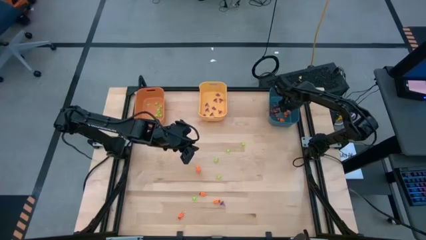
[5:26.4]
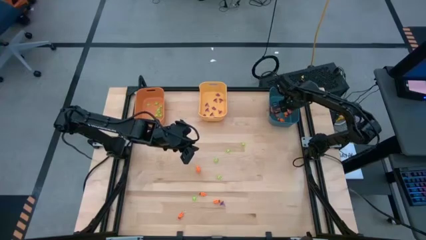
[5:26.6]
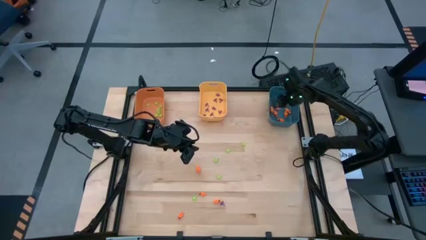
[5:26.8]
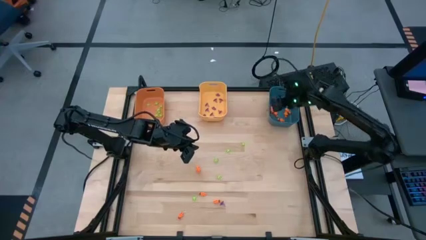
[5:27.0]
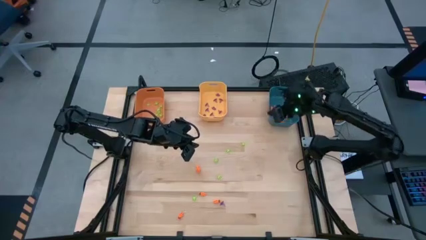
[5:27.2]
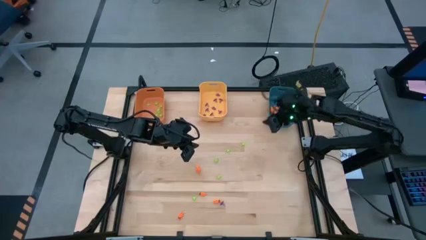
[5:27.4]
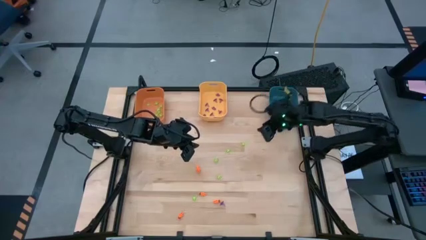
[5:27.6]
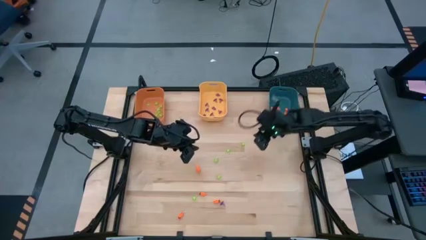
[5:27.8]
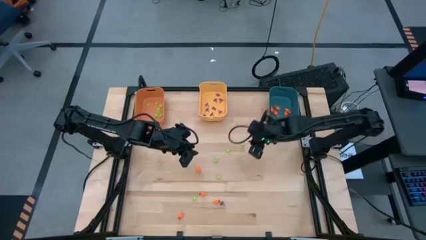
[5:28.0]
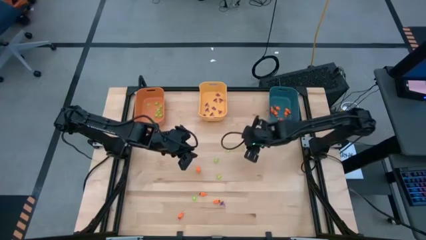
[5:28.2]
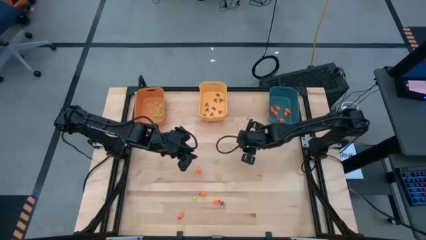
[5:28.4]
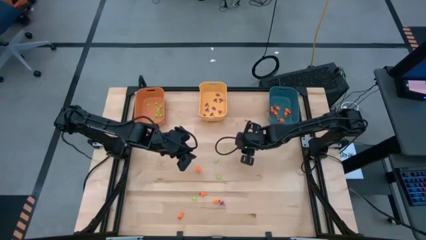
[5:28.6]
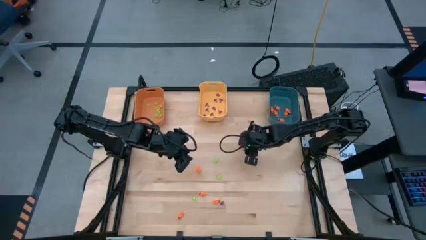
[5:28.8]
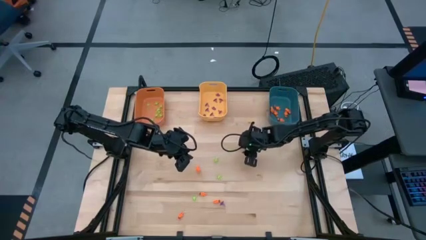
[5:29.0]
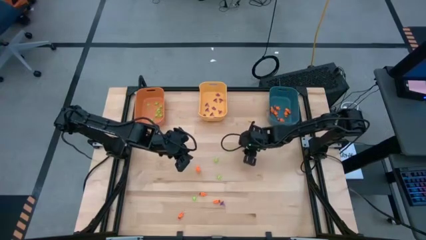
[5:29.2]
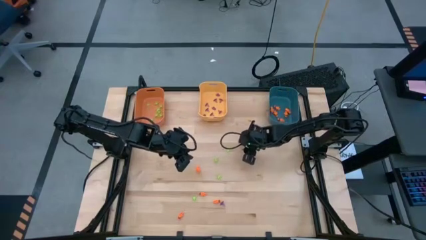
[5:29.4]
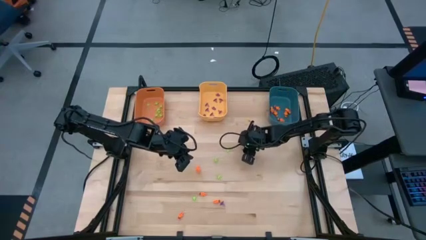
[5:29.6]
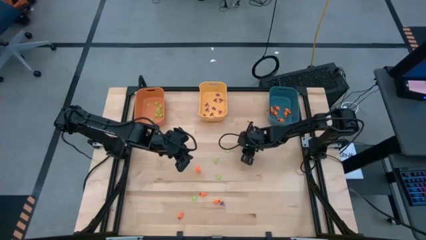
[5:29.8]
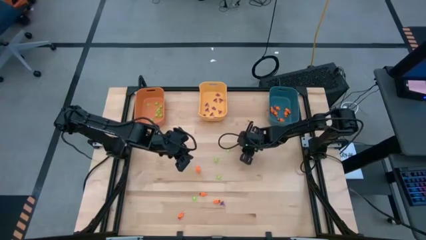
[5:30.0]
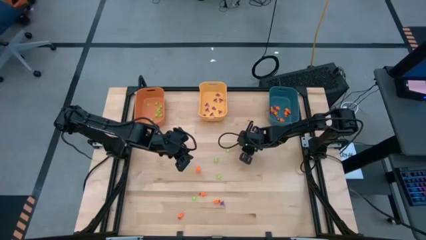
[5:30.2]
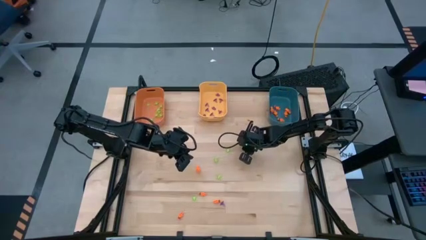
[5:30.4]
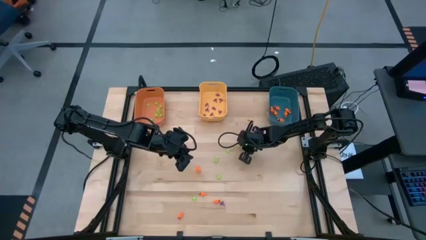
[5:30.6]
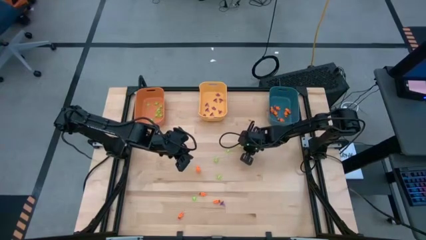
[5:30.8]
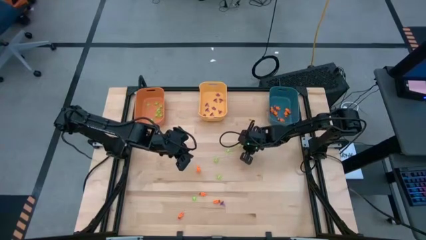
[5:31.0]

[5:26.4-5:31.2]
Task: Sort Halloween decoration
Put the green spider toy into the orange bin

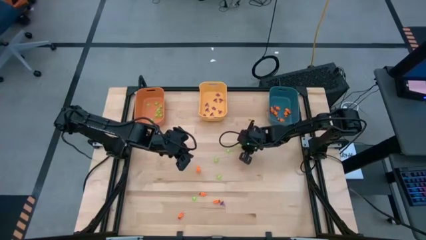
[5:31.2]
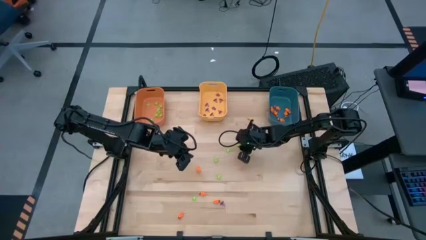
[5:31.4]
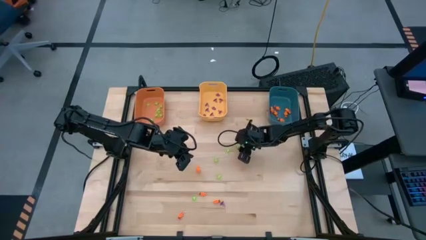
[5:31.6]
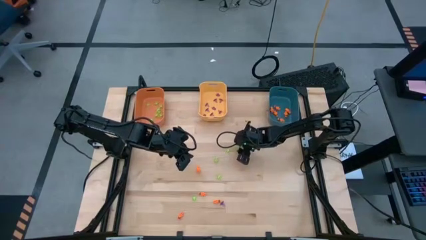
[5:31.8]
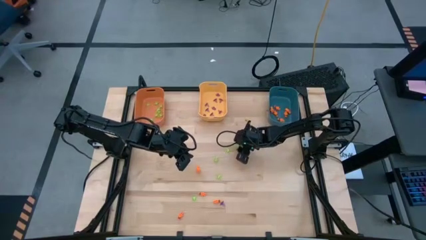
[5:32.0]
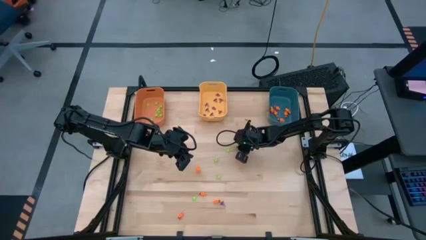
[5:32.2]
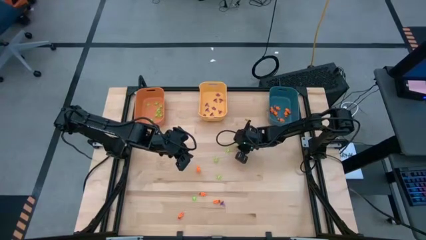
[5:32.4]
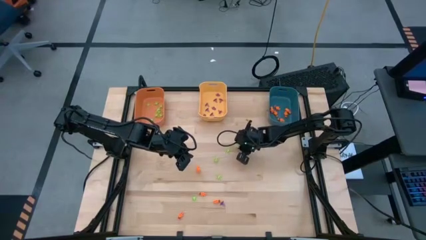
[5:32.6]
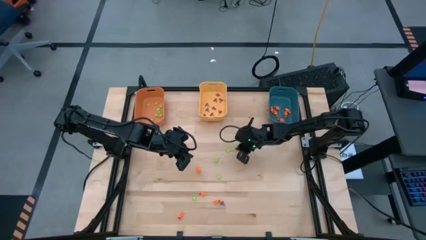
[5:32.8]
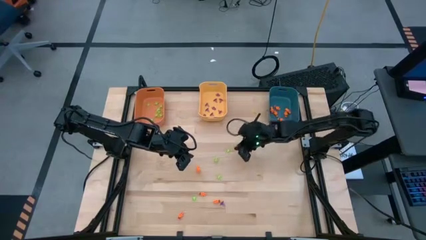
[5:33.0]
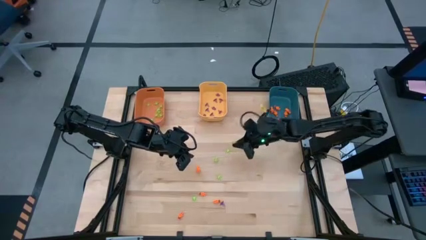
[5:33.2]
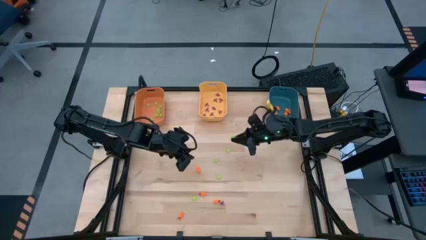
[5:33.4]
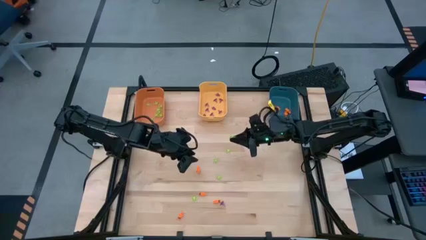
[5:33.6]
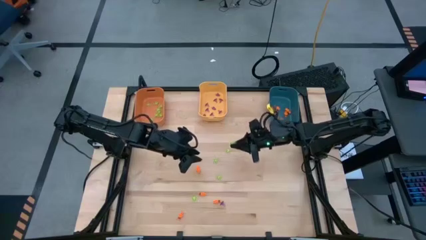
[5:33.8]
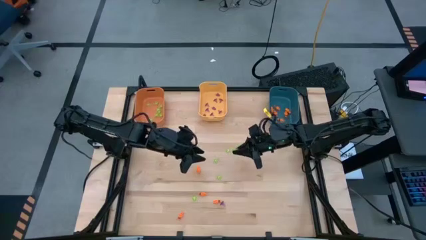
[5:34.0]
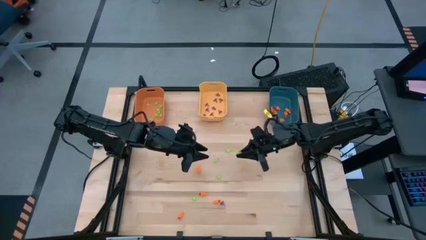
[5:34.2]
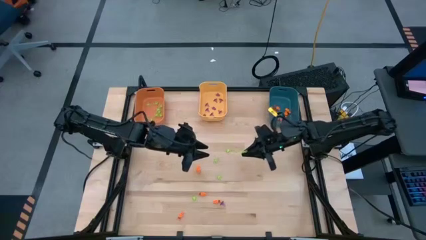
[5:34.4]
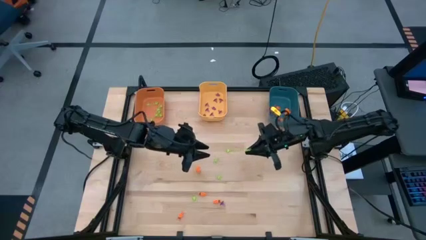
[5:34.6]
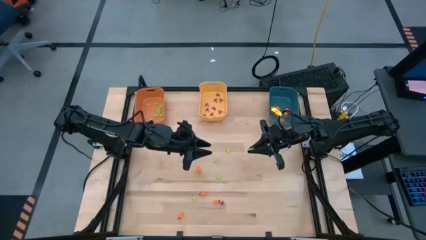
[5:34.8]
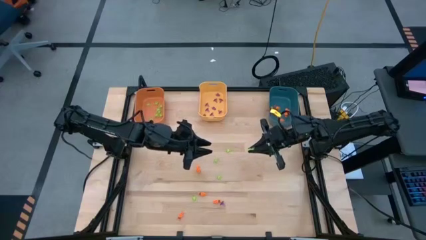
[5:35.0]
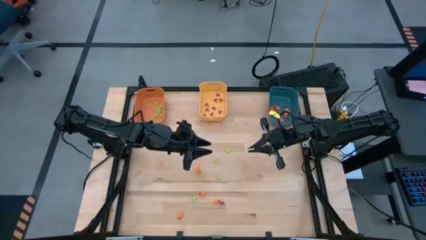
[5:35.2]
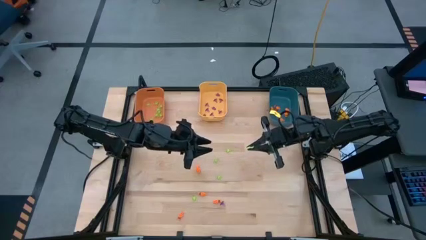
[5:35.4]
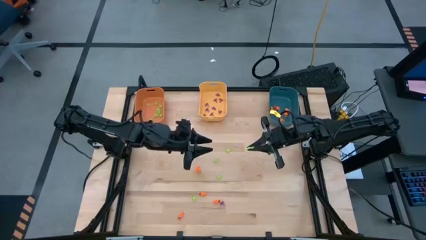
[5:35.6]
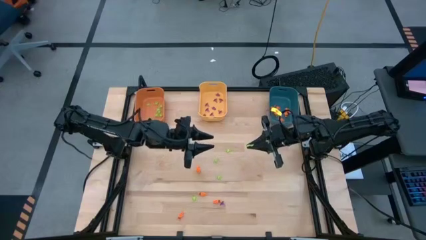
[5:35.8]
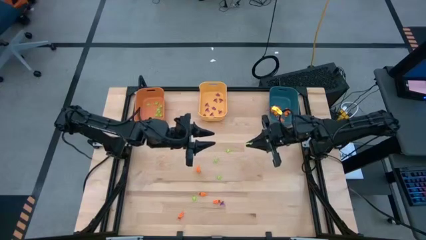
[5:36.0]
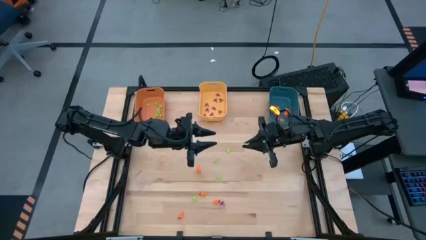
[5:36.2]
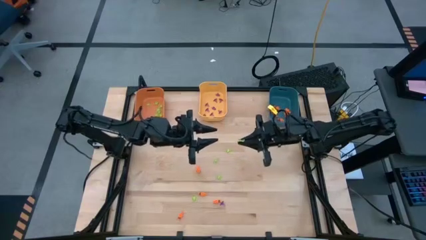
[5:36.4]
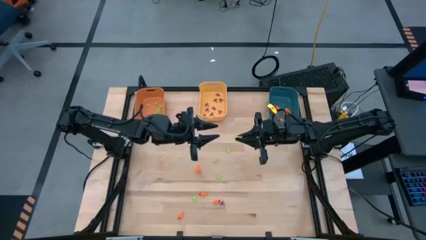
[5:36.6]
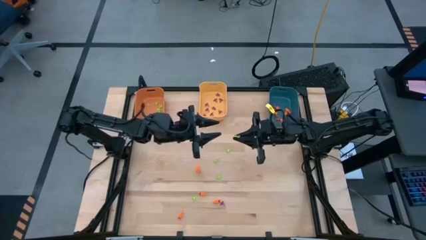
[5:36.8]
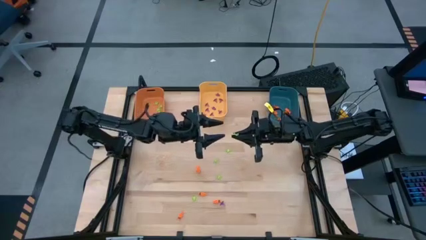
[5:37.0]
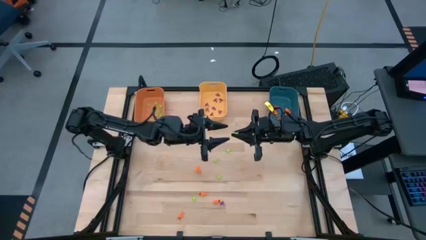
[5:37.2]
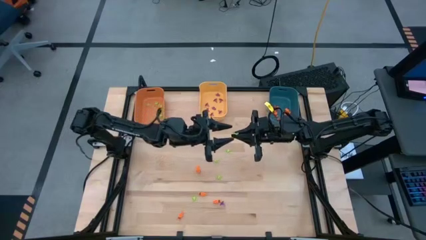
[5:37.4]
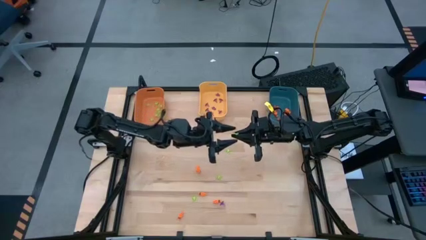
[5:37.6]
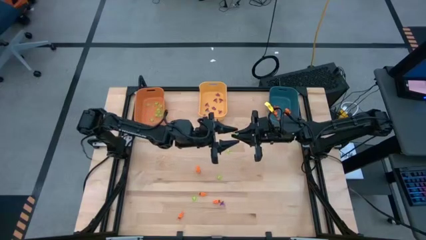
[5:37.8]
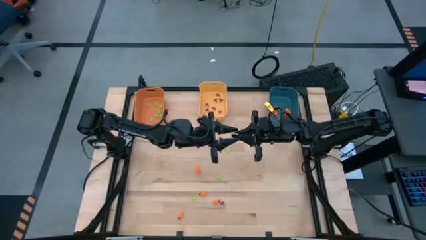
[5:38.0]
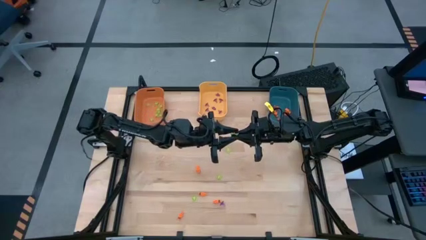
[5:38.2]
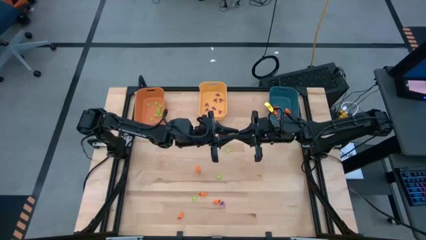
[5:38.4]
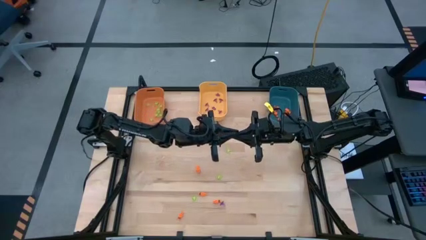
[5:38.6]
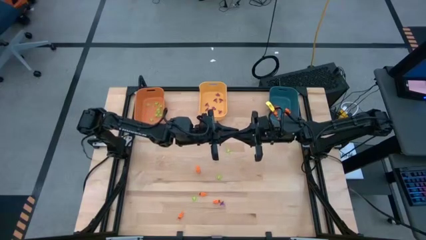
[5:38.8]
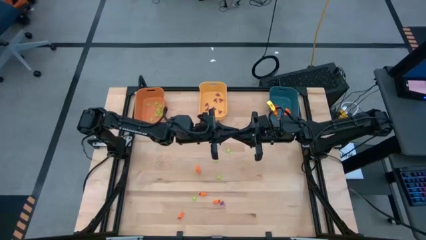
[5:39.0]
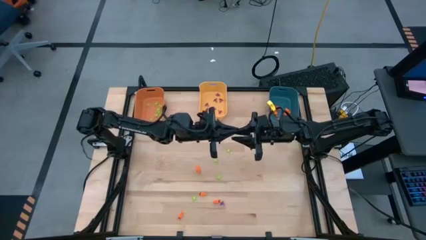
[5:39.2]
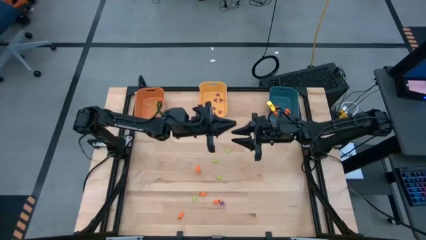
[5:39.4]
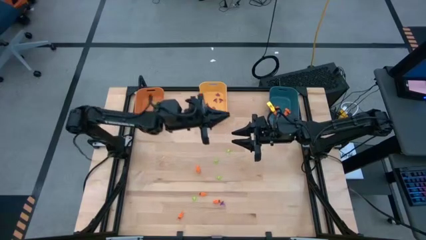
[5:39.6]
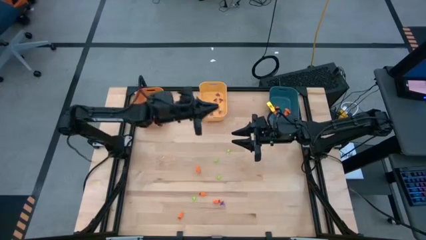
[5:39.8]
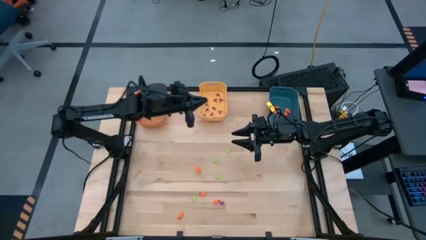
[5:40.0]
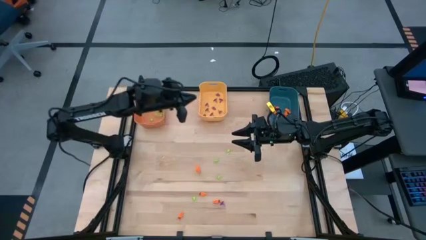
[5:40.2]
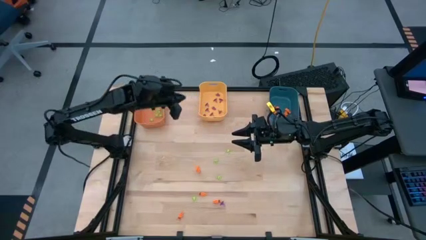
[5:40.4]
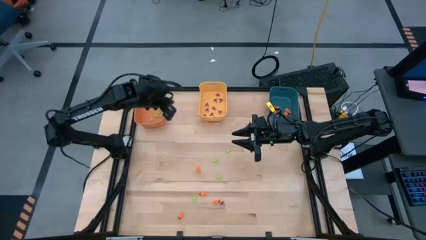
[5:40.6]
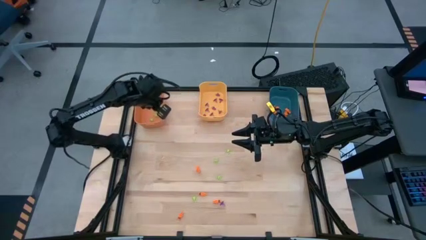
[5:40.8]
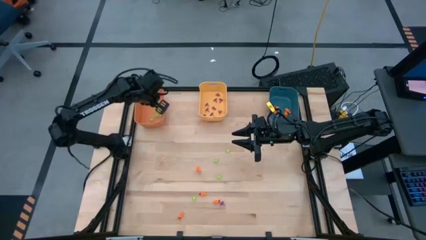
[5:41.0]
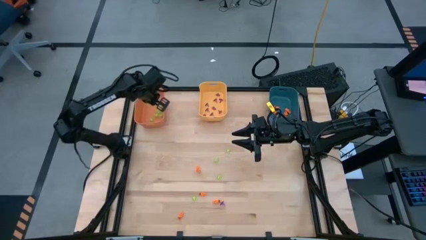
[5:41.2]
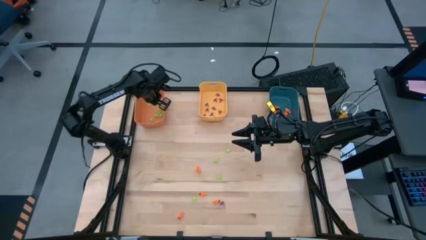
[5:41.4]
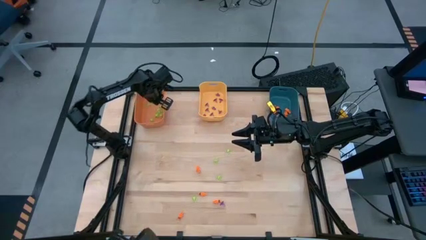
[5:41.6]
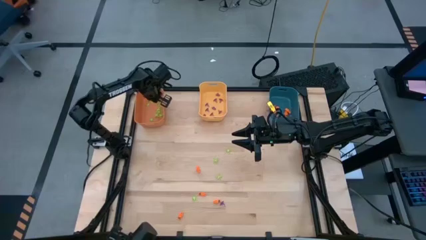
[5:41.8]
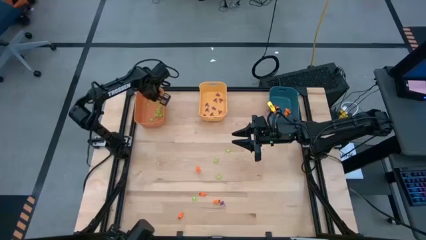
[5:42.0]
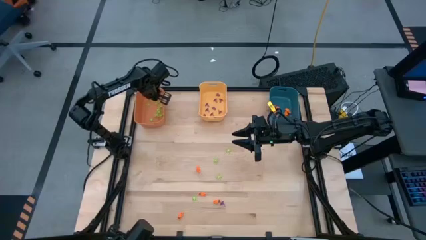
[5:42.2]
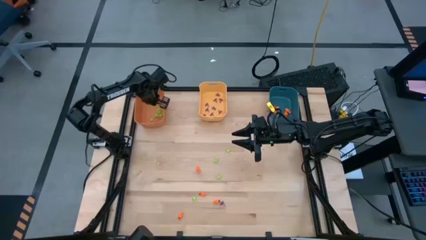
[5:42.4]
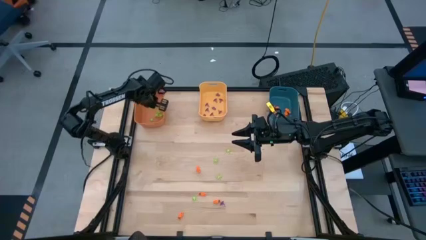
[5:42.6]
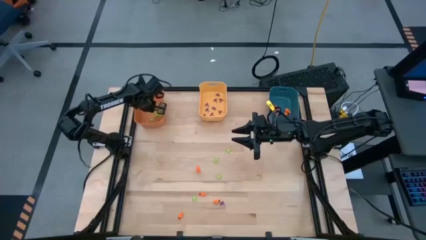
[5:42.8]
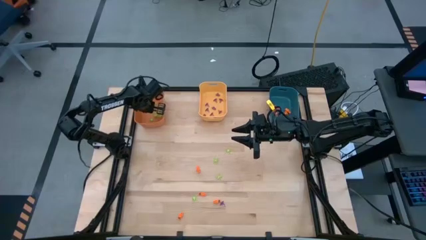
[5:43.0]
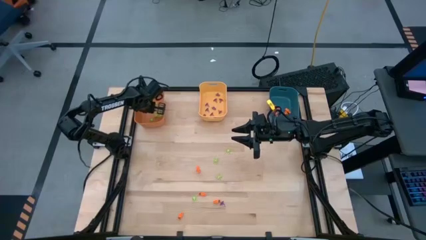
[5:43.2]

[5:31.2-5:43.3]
Put the green spider toy into the orange bin
